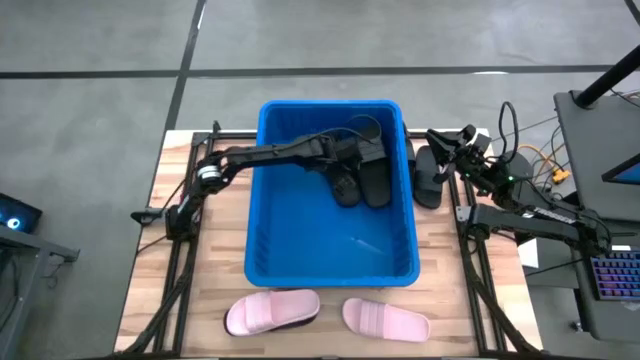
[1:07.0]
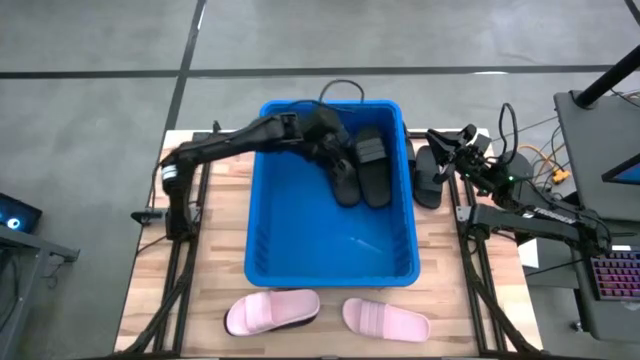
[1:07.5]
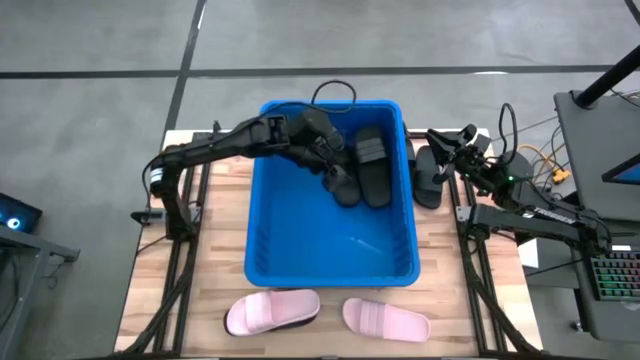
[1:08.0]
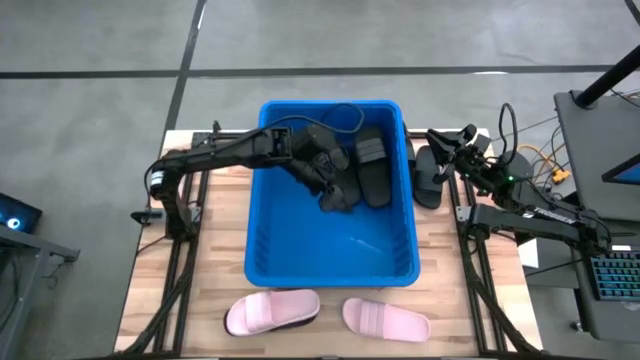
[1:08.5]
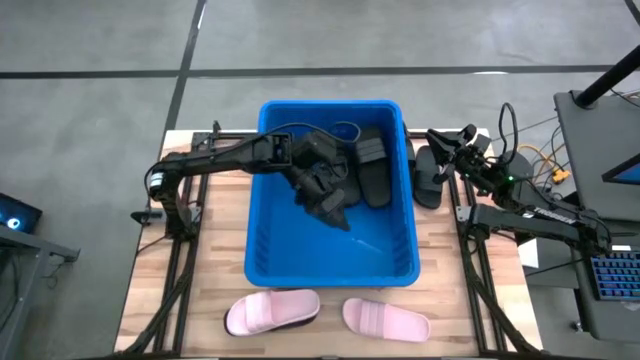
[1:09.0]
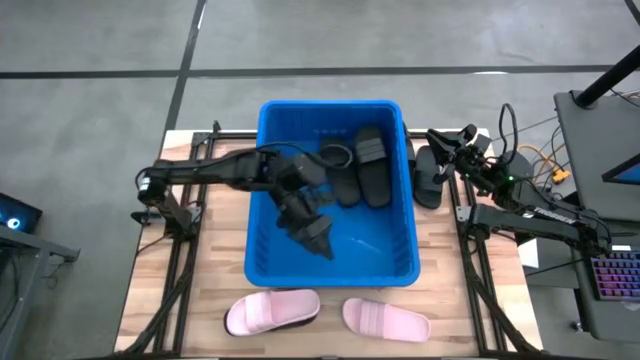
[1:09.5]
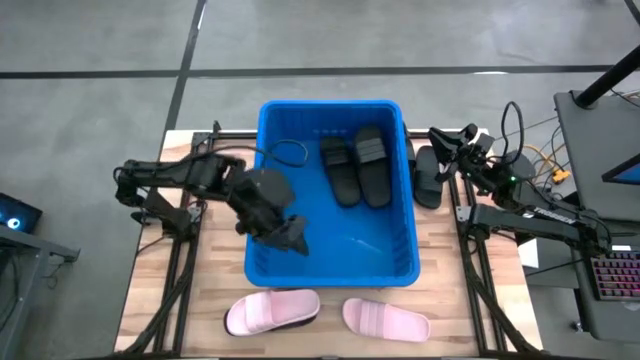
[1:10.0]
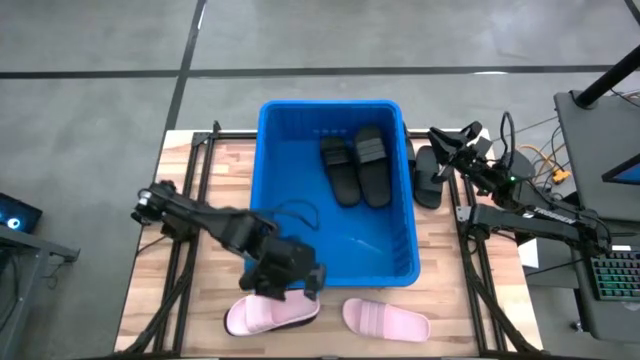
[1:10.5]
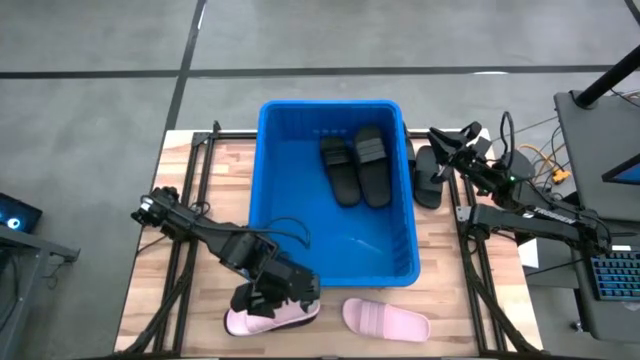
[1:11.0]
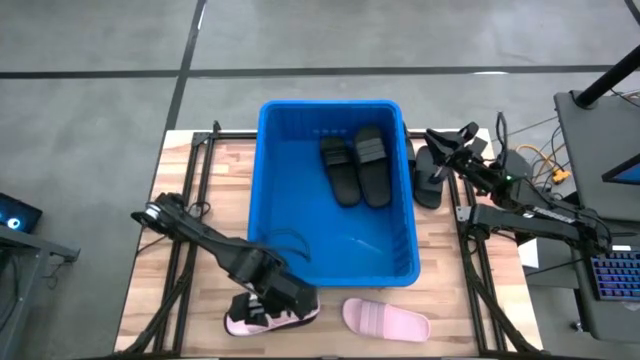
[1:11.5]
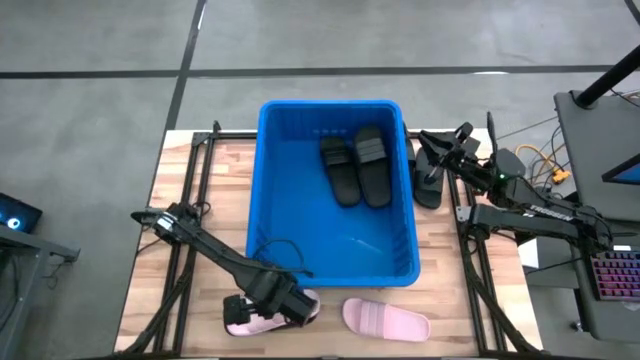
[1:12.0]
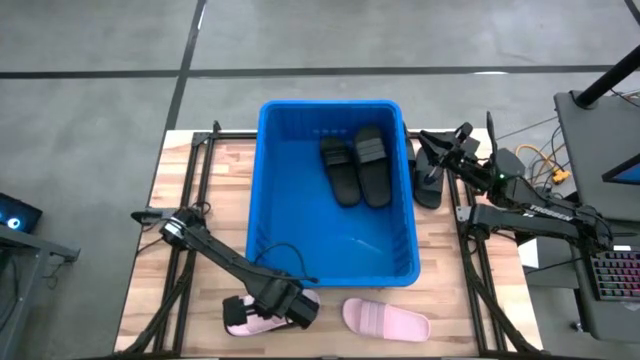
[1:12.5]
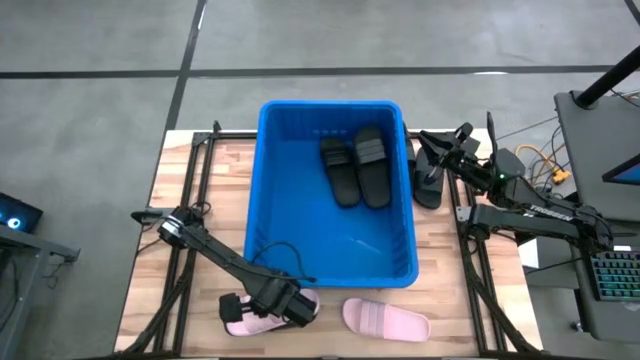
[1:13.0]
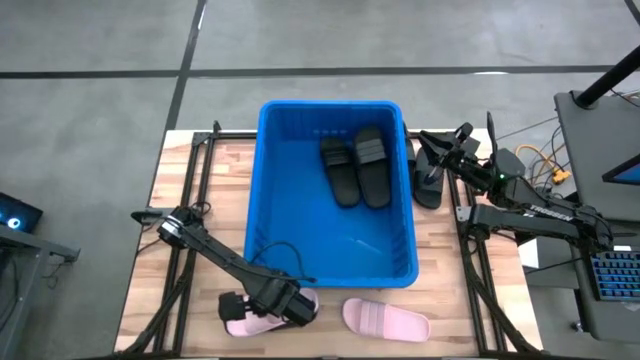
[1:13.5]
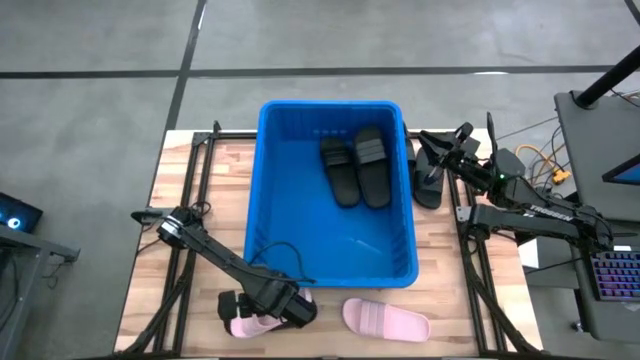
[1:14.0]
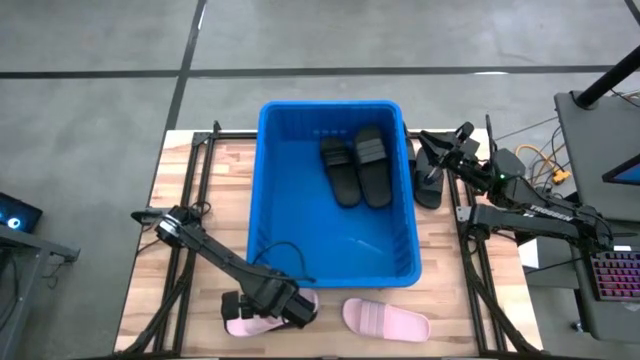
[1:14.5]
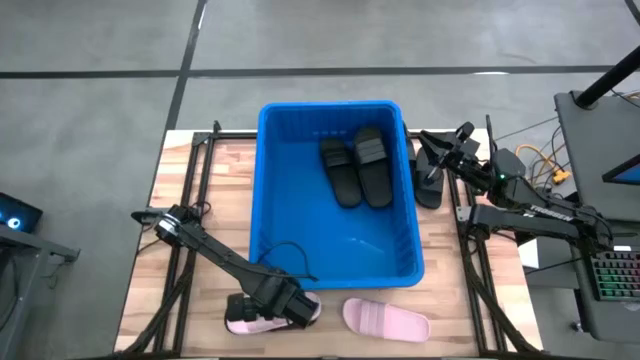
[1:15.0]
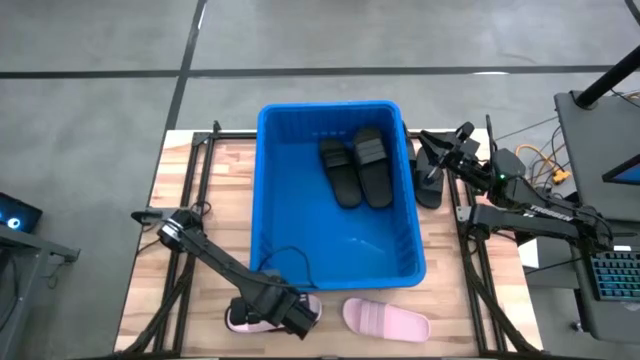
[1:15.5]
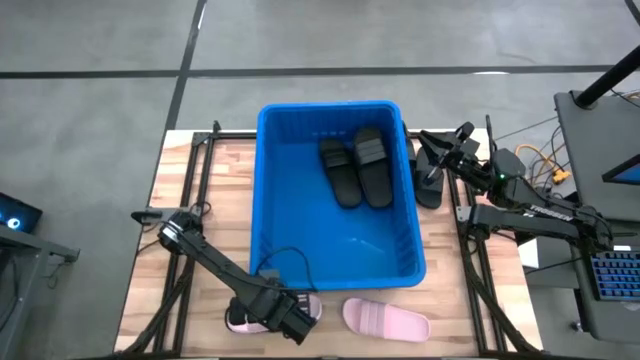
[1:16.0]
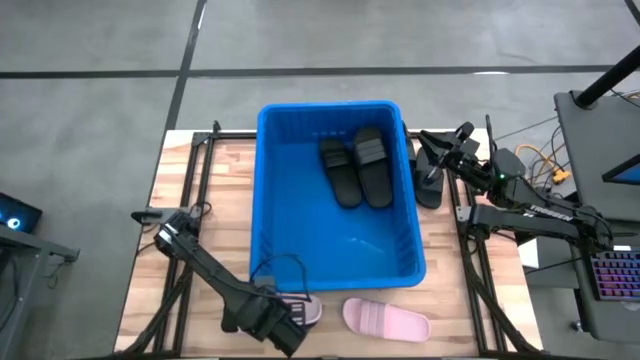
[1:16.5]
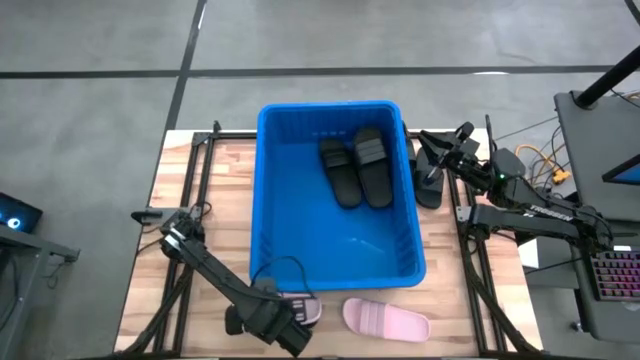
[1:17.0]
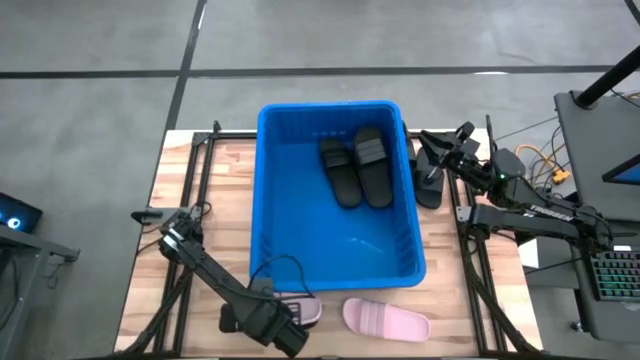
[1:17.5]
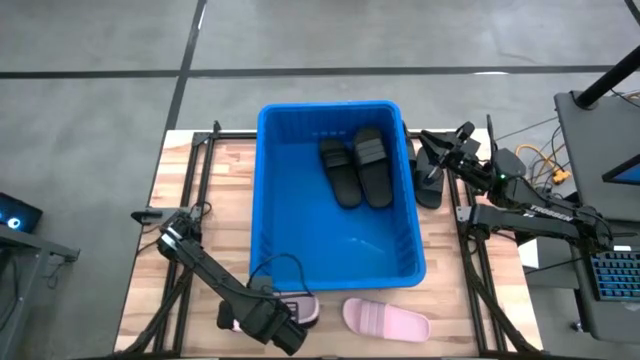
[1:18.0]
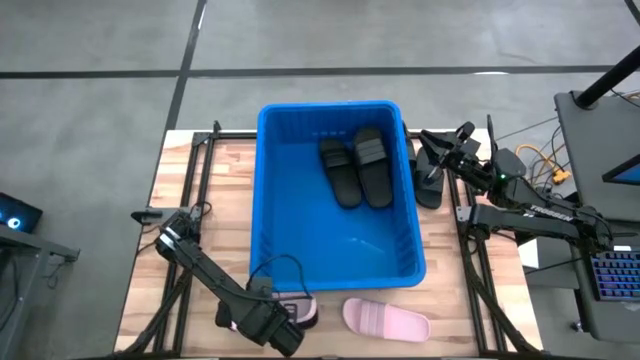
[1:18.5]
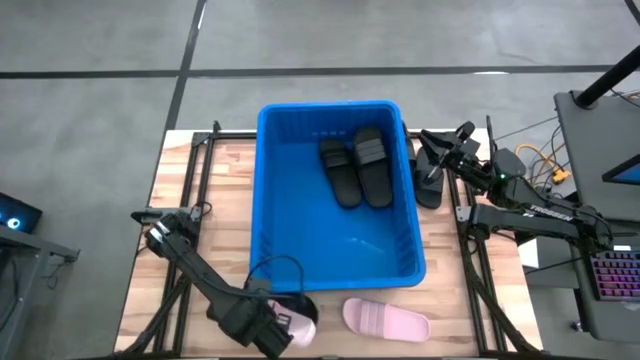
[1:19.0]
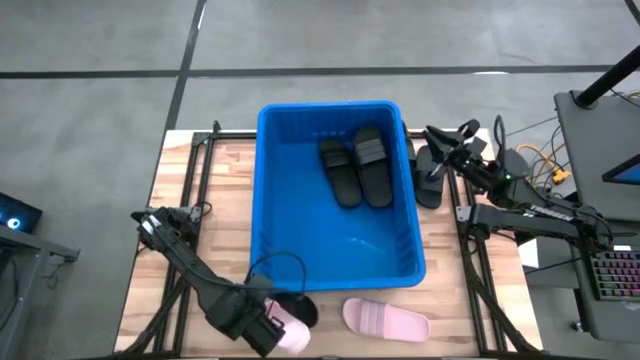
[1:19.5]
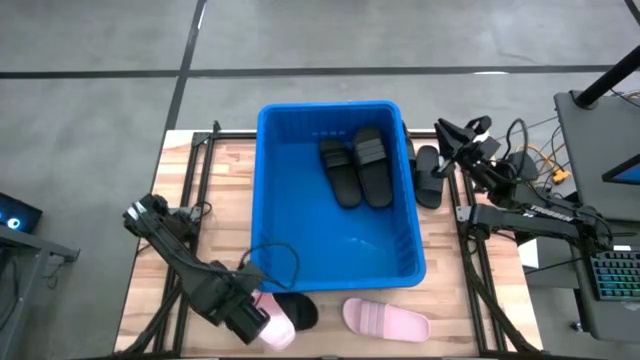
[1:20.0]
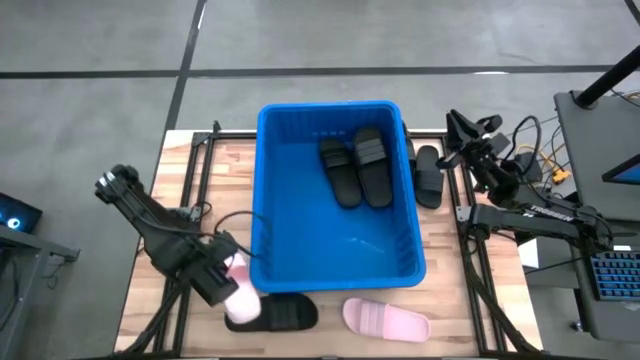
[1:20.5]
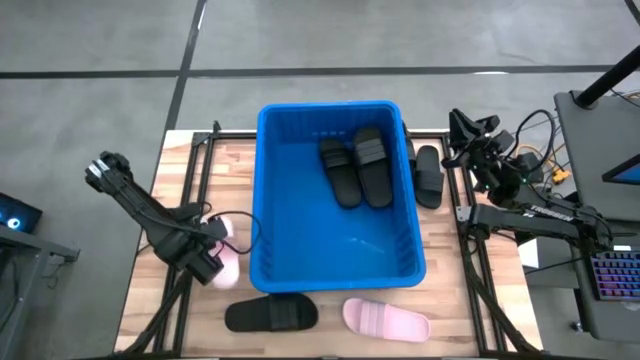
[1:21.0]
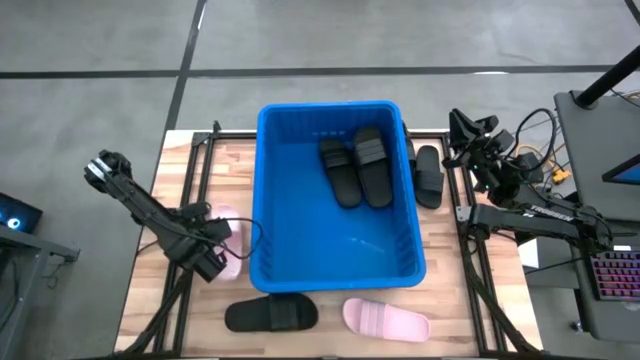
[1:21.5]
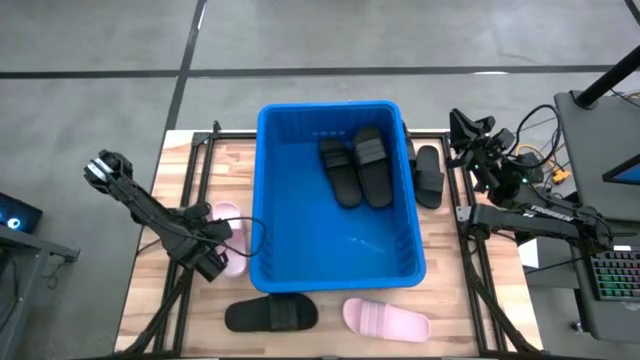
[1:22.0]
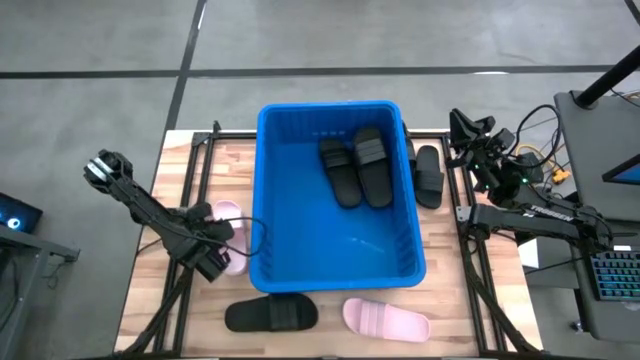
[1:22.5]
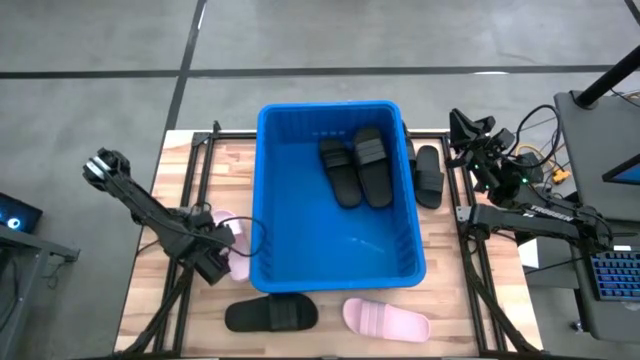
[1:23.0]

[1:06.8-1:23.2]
Task: Pick and place slides into bin
Move the pink slides to the middle left of the table
